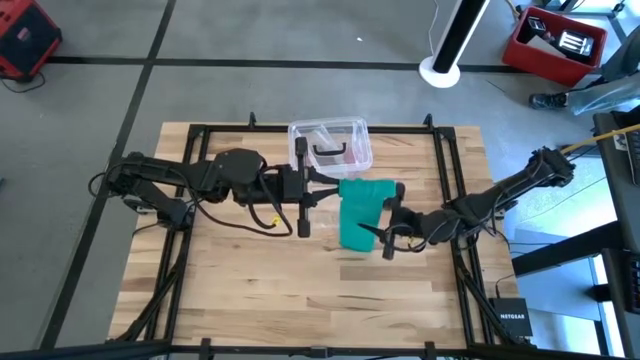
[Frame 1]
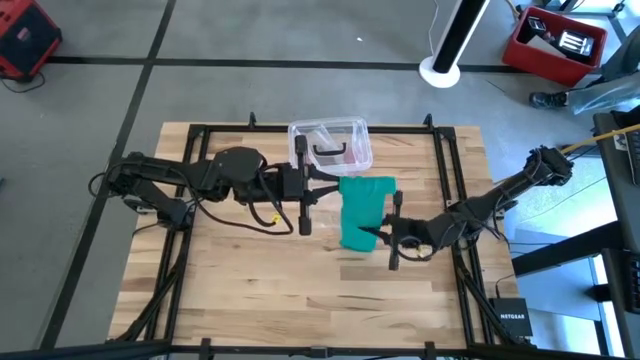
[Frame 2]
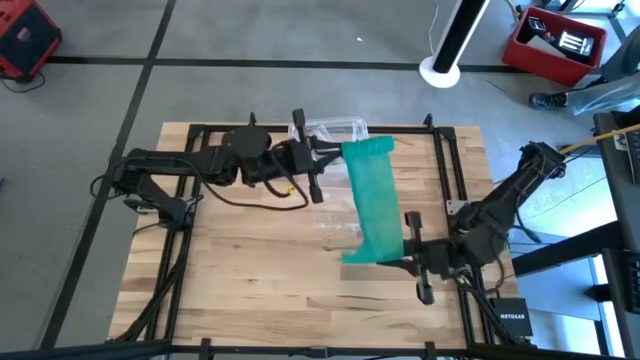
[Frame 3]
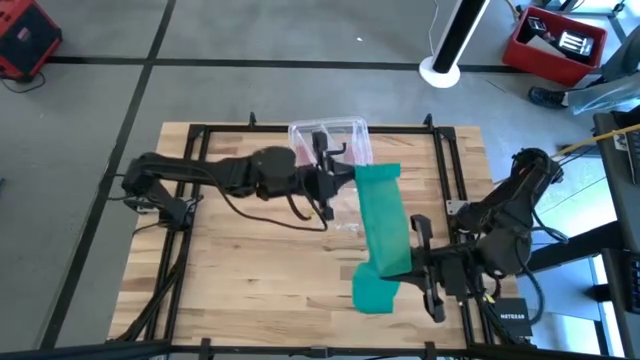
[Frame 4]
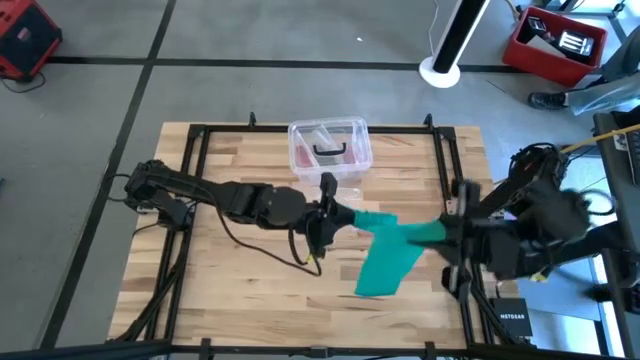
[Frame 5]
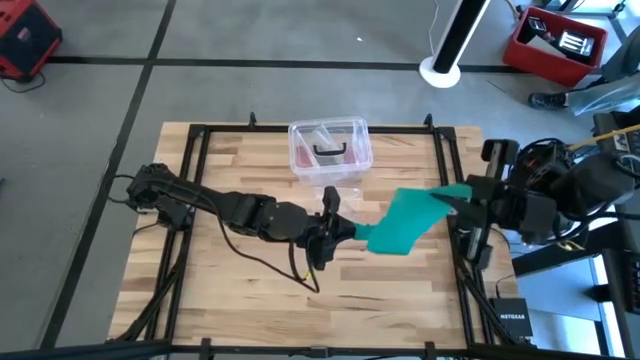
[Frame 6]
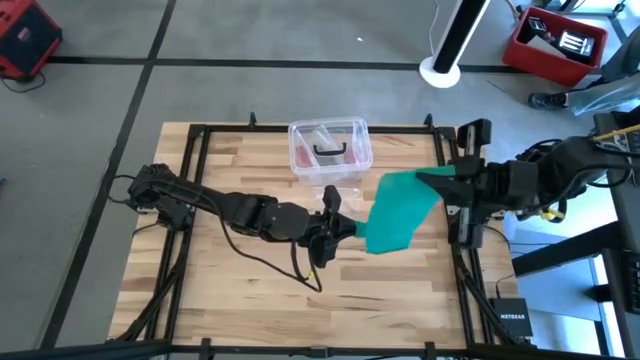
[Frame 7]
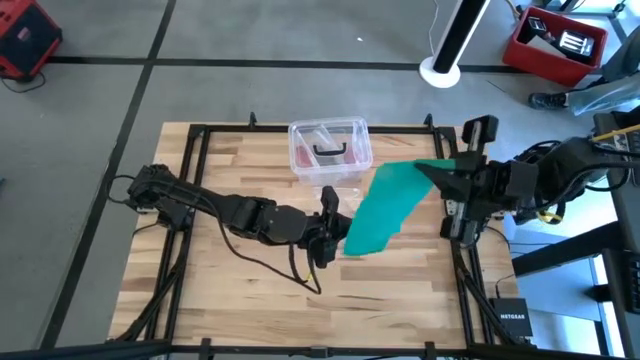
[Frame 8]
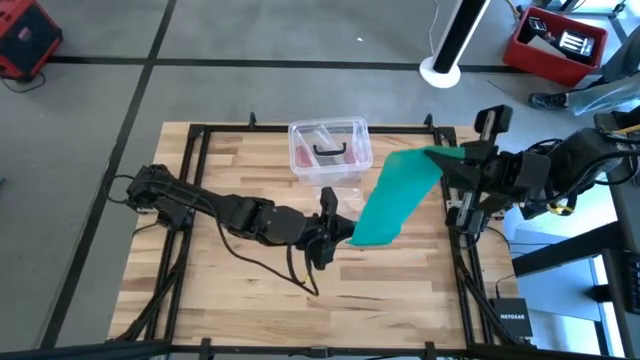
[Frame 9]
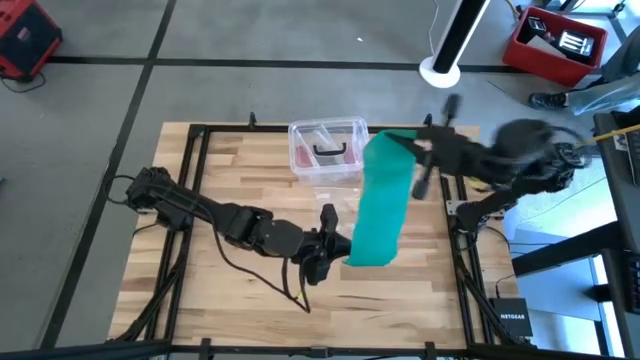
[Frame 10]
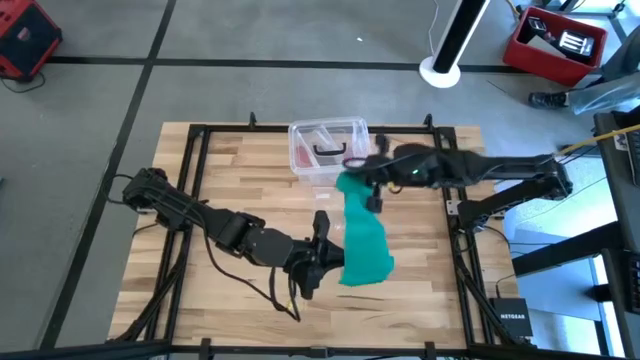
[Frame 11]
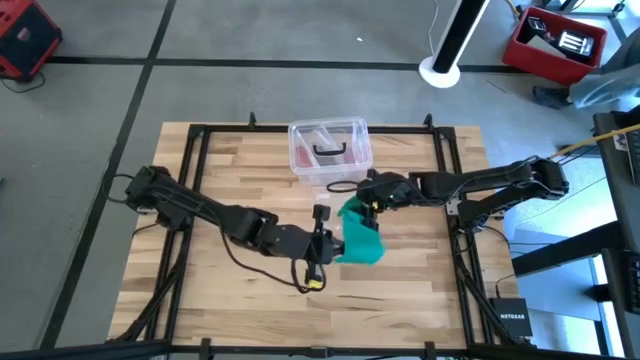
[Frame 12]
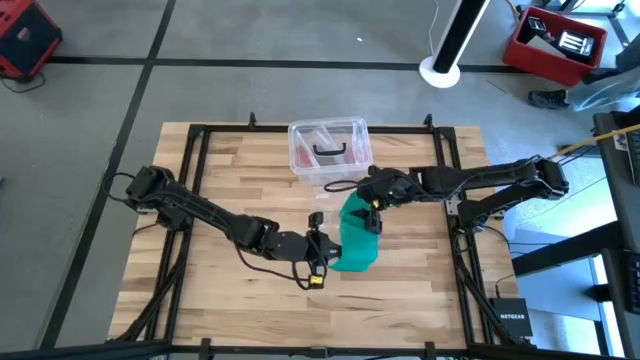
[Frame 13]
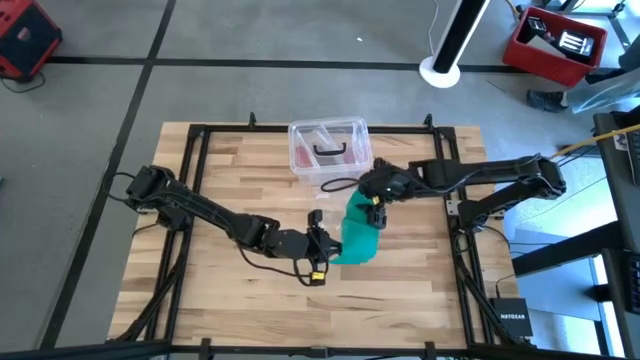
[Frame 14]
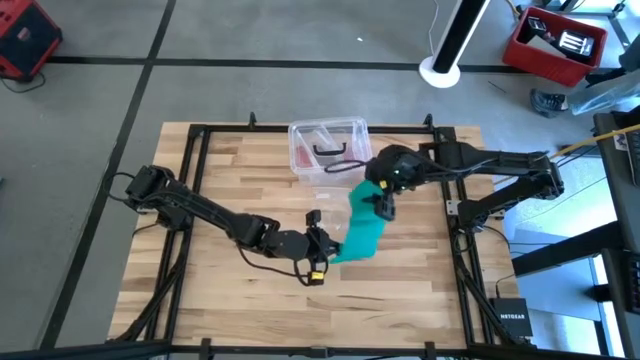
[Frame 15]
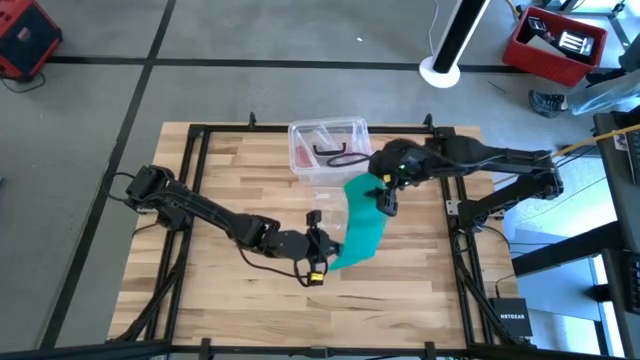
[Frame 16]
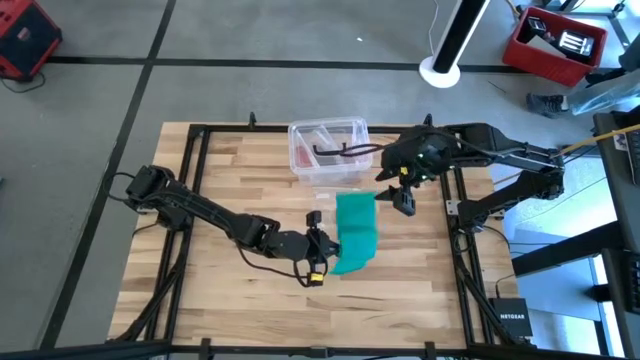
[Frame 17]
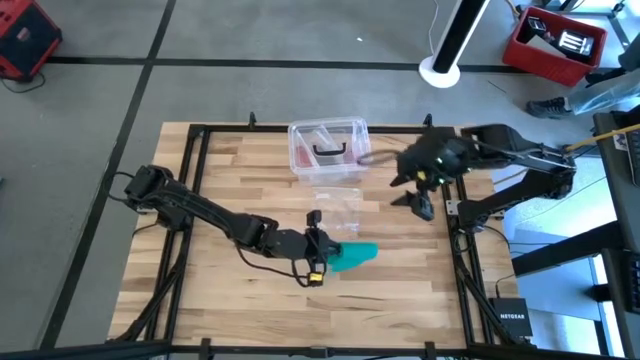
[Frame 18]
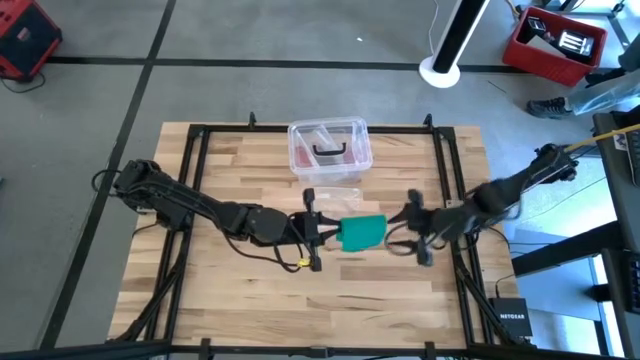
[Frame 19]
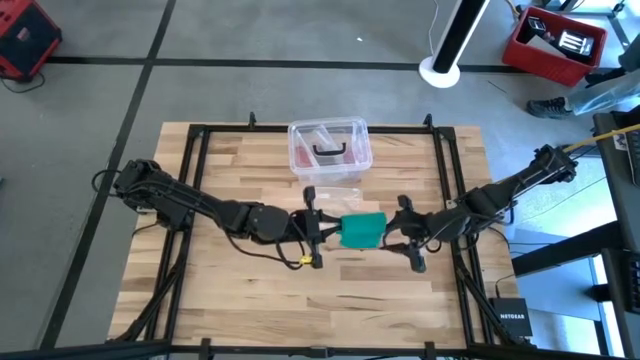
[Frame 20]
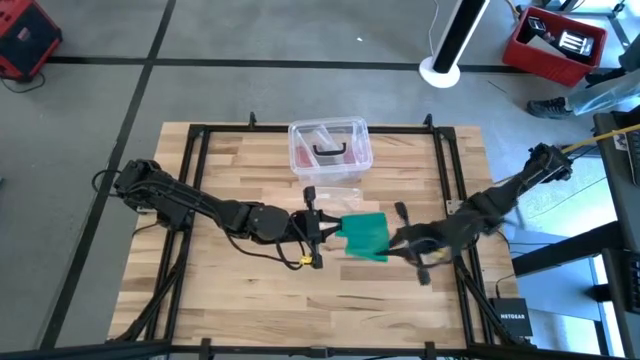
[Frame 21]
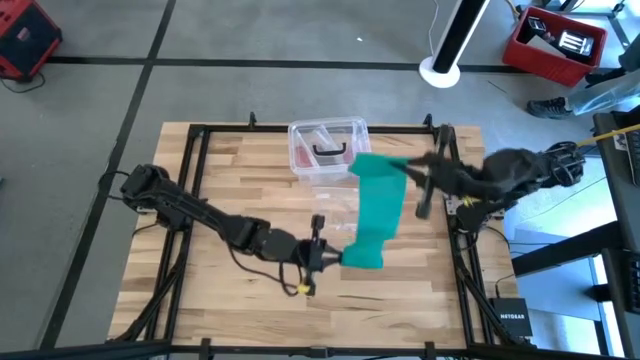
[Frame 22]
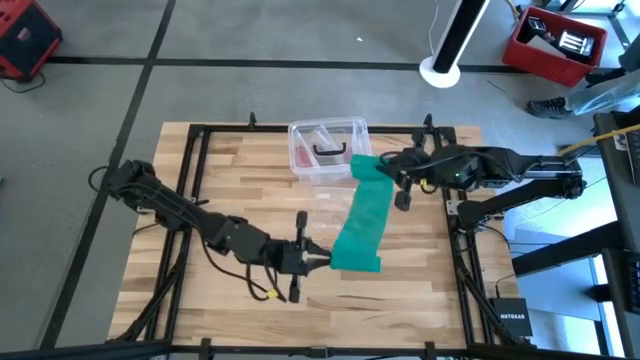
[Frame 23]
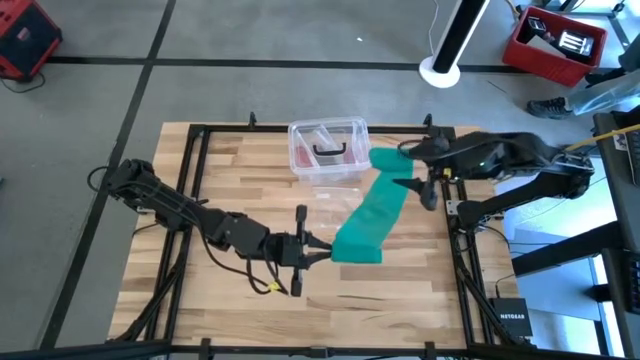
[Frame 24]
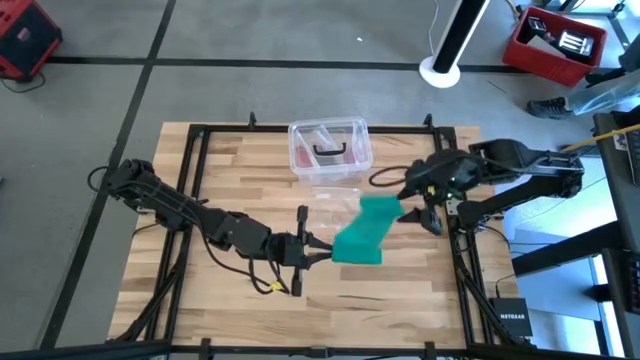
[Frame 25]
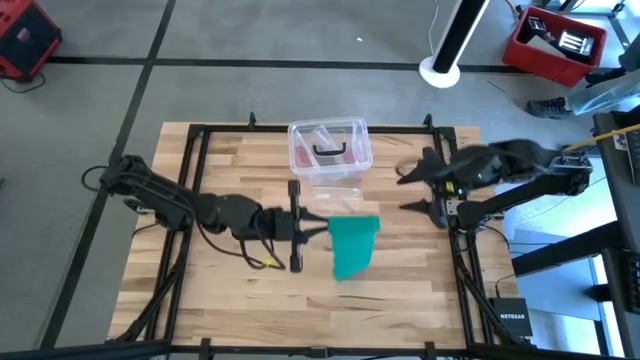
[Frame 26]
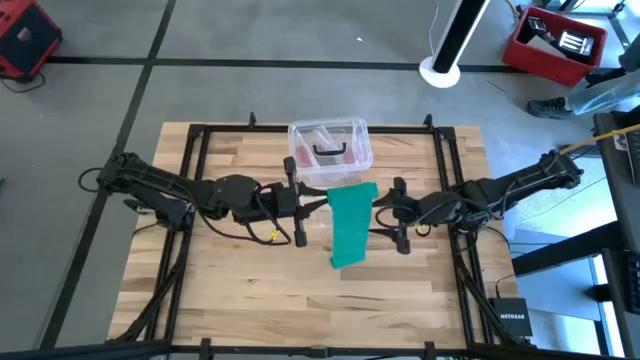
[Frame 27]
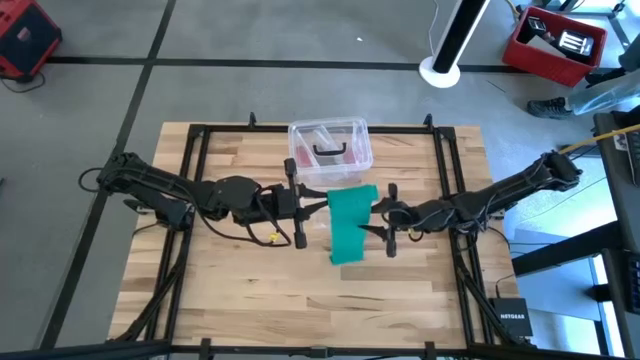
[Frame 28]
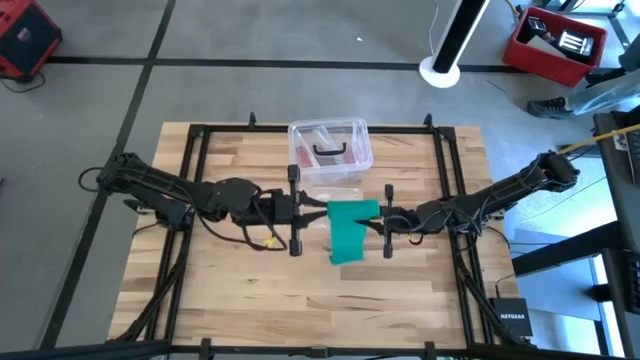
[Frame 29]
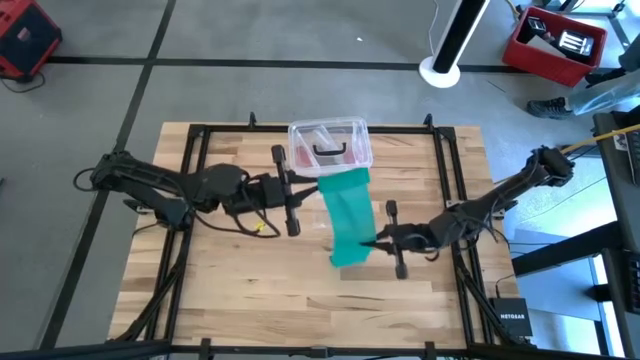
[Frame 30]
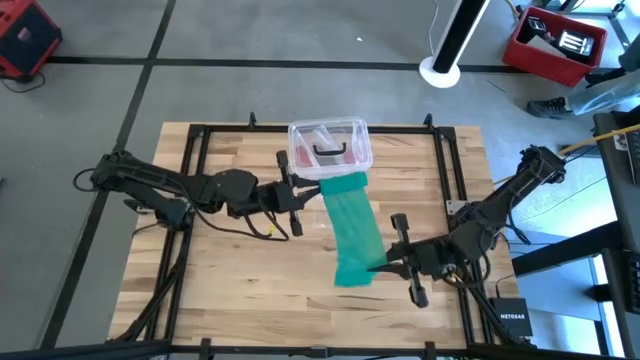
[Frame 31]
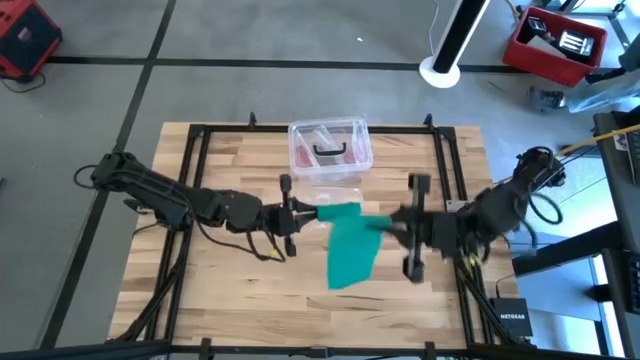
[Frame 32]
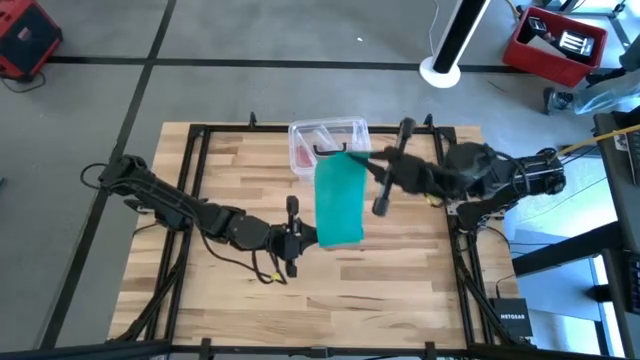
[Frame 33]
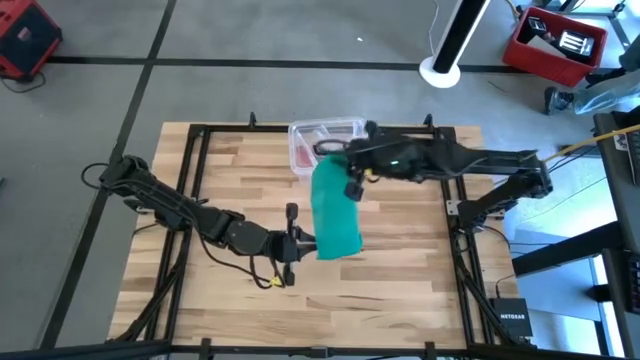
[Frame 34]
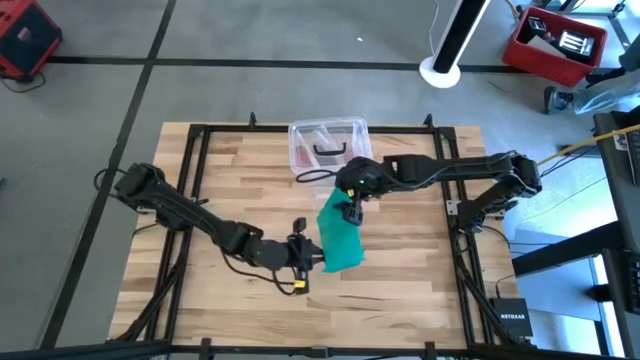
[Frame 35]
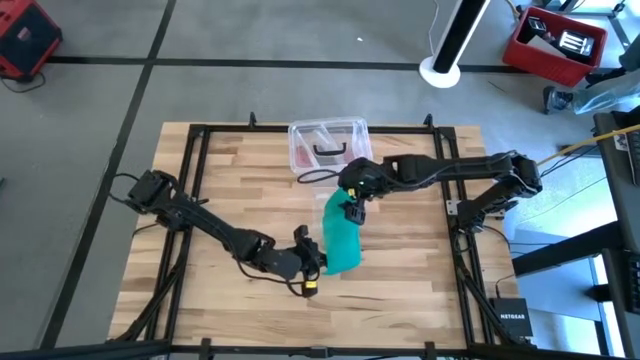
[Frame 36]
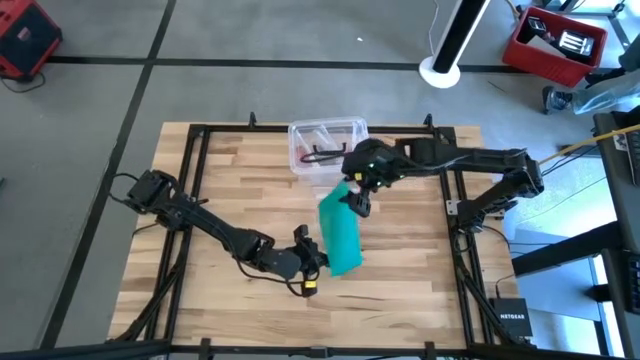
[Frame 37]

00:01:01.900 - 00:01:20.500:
Task: Roll bandage
Roll the green bandage

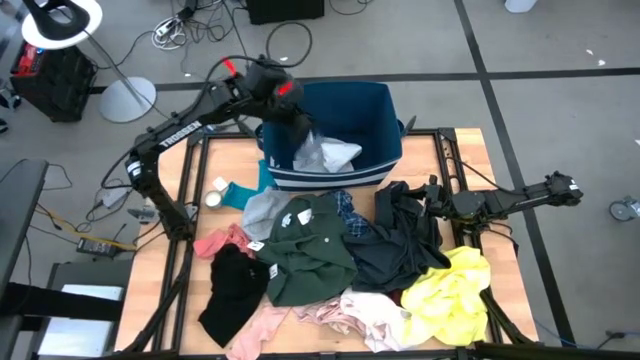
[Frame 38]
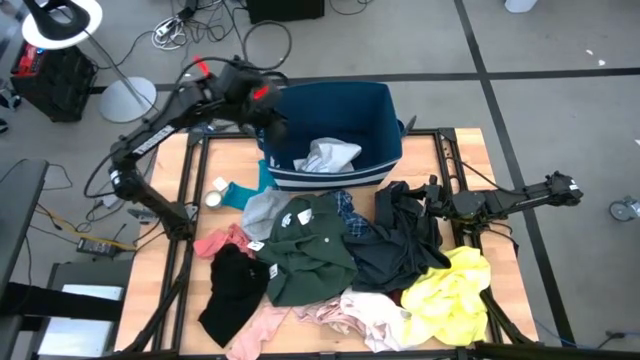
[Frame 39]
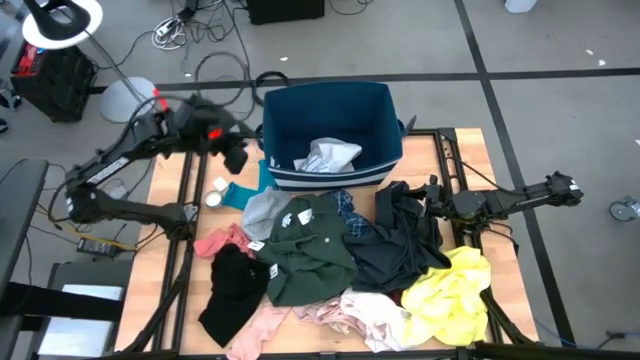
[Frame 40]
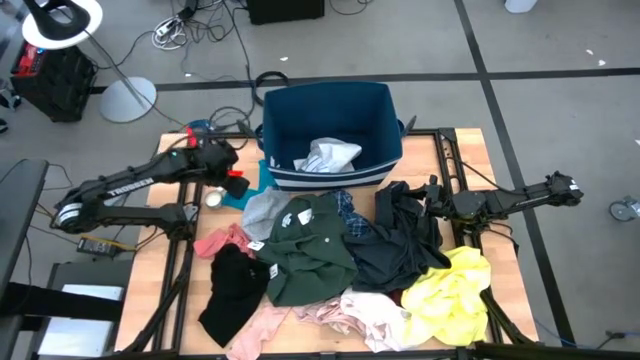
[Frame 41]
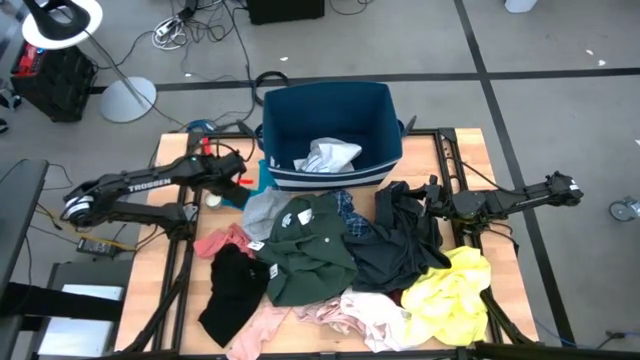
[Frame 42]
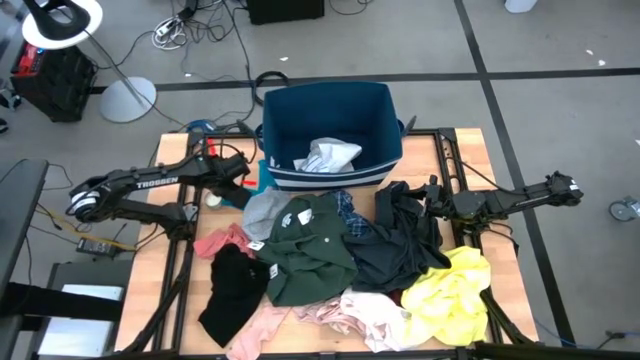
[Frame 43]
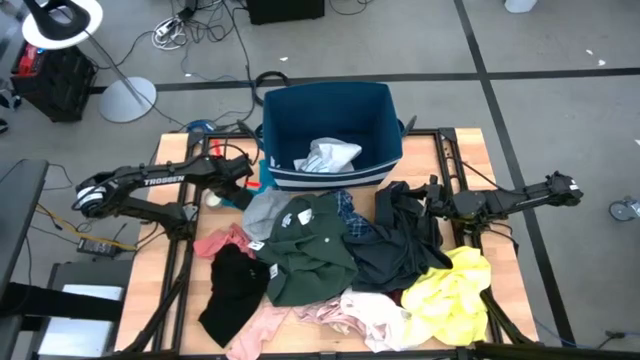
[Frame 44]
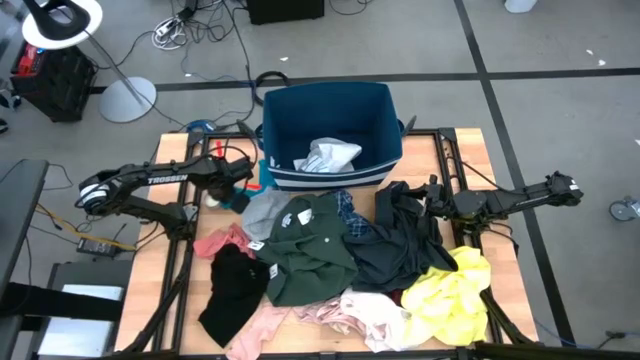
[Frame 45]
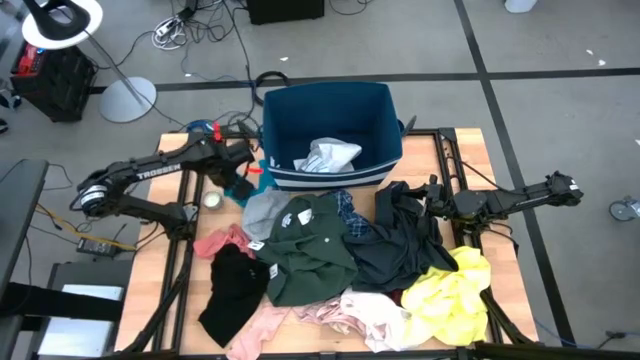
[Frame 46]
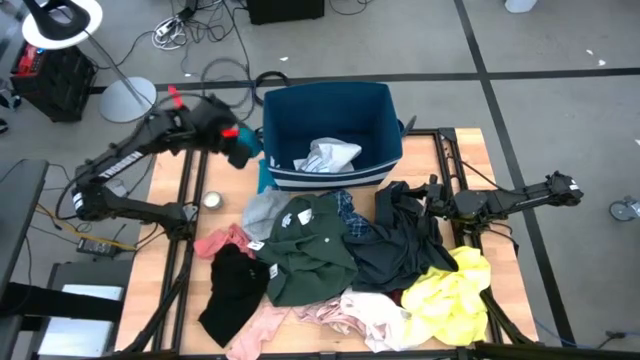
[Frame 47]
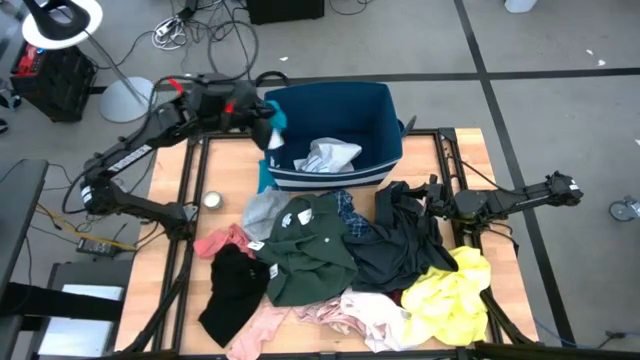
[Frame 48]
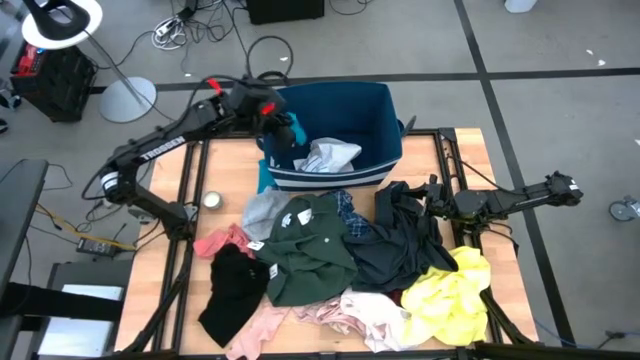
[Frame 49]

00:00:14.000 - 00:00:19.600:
Task: Sort clothes
Put the bottom blue sock into the blue laundry bin
